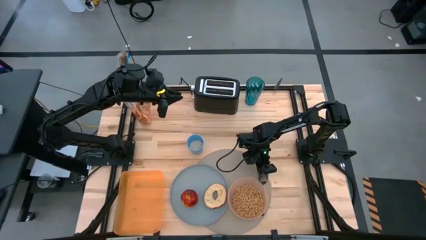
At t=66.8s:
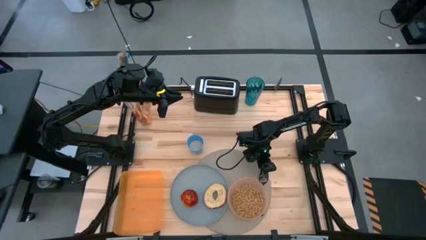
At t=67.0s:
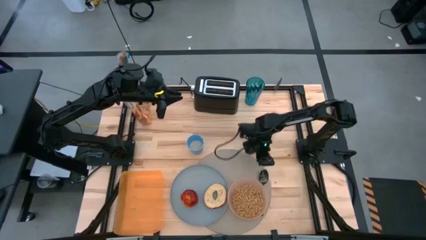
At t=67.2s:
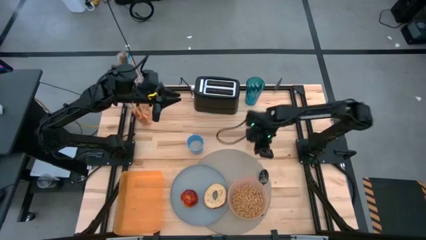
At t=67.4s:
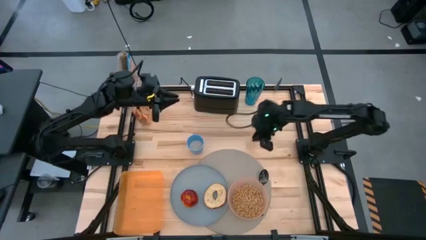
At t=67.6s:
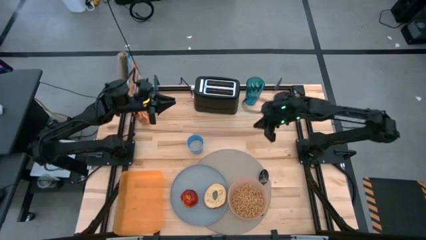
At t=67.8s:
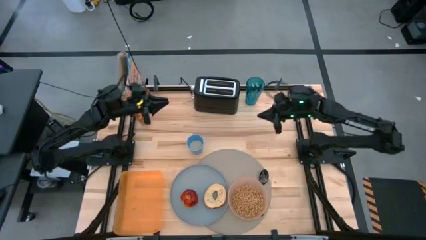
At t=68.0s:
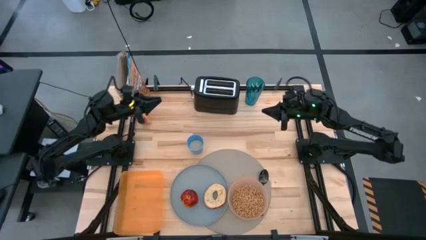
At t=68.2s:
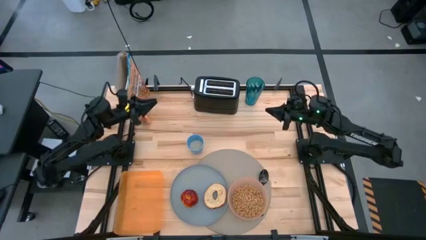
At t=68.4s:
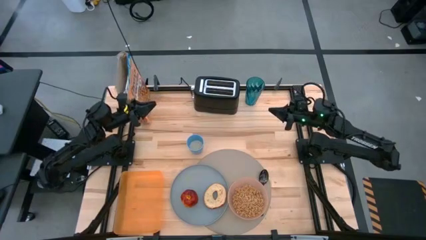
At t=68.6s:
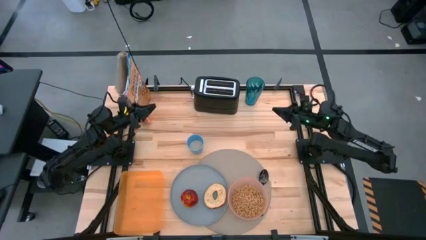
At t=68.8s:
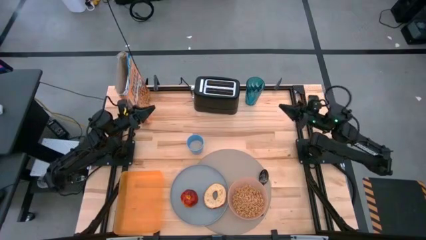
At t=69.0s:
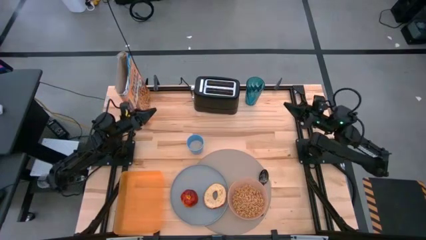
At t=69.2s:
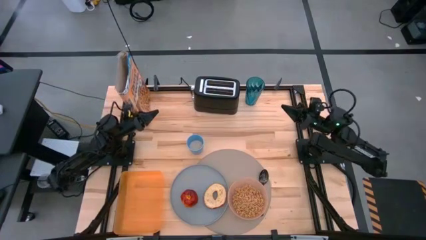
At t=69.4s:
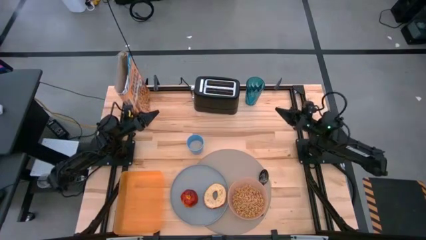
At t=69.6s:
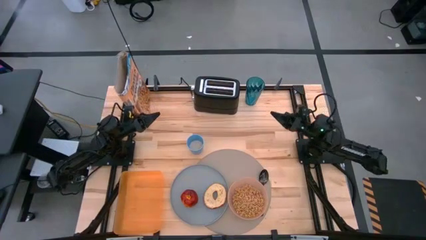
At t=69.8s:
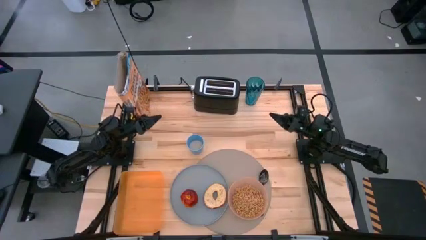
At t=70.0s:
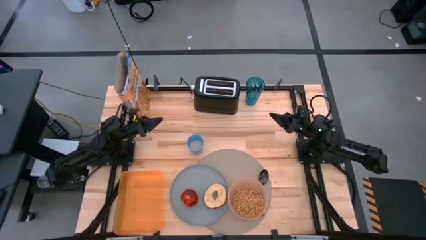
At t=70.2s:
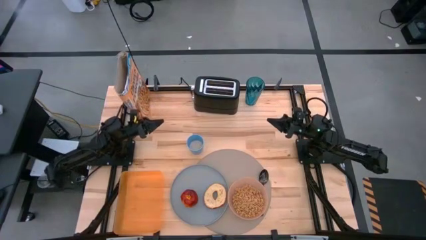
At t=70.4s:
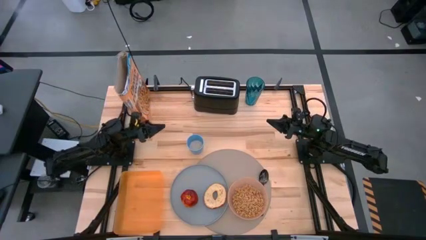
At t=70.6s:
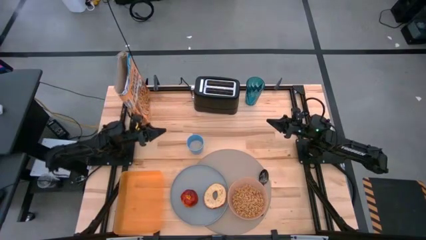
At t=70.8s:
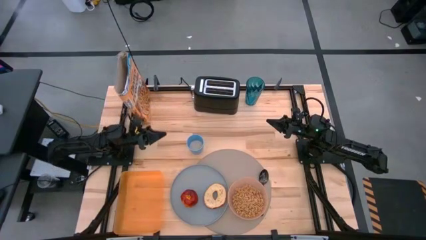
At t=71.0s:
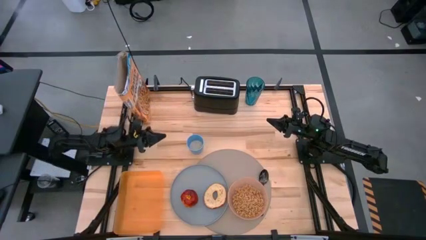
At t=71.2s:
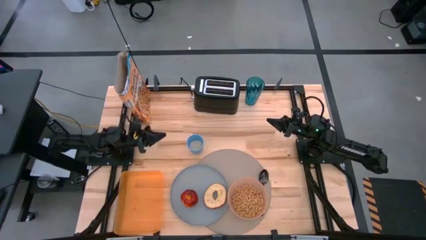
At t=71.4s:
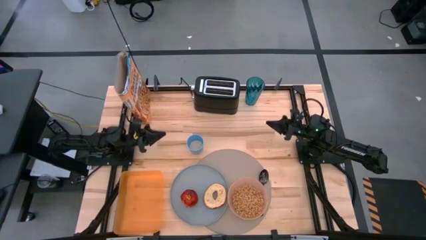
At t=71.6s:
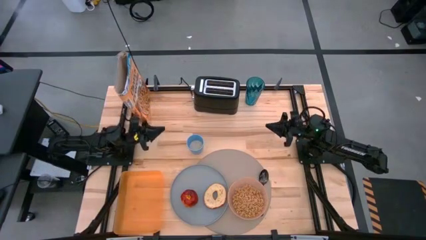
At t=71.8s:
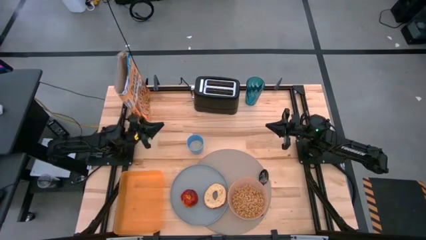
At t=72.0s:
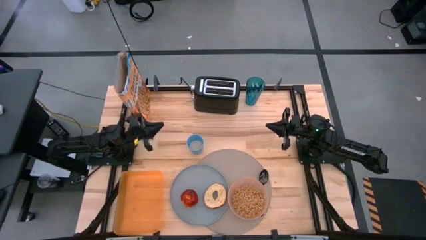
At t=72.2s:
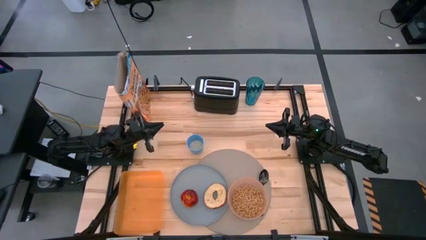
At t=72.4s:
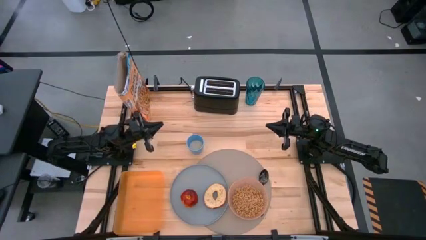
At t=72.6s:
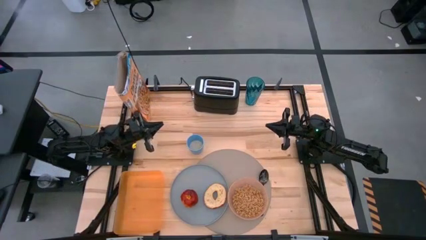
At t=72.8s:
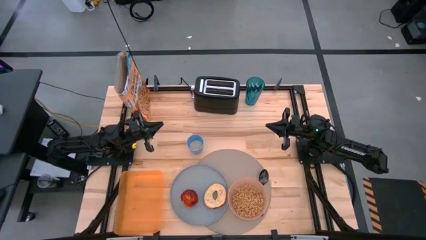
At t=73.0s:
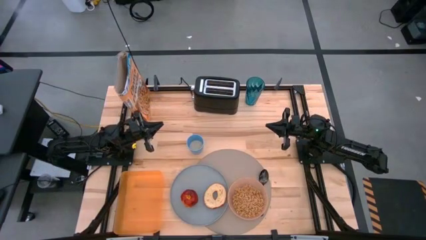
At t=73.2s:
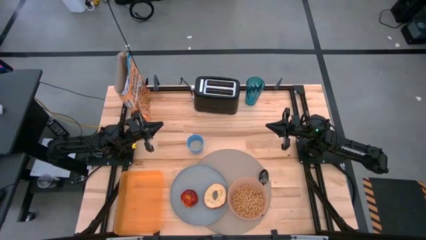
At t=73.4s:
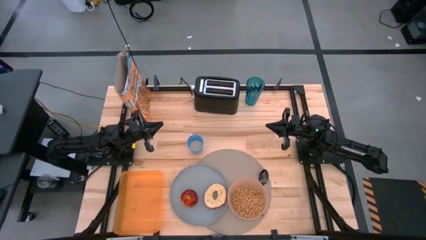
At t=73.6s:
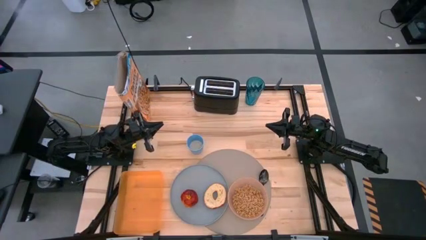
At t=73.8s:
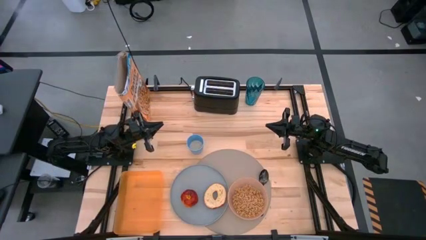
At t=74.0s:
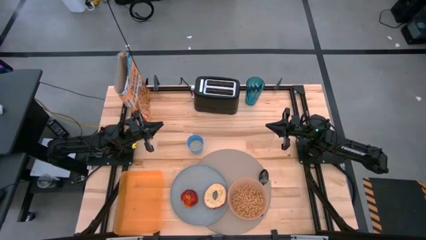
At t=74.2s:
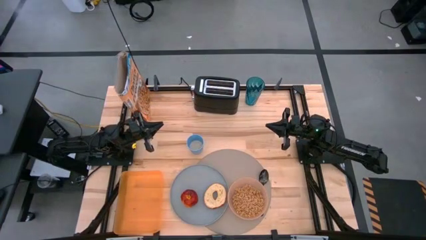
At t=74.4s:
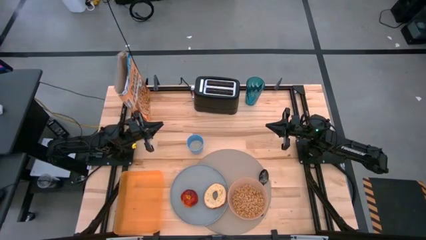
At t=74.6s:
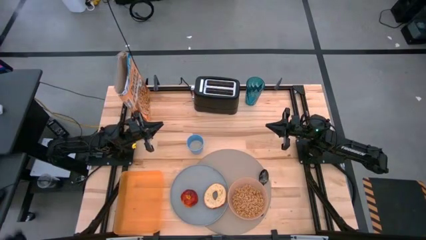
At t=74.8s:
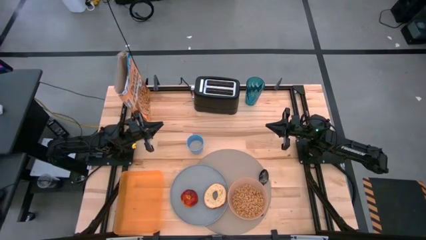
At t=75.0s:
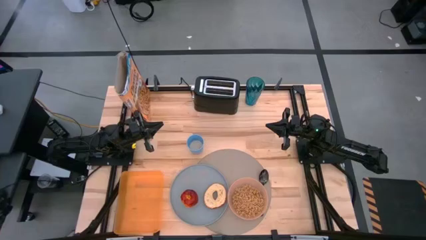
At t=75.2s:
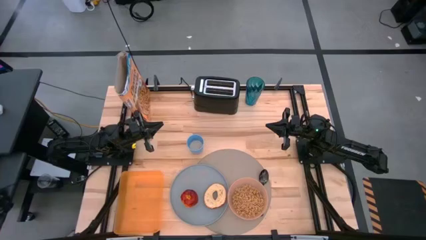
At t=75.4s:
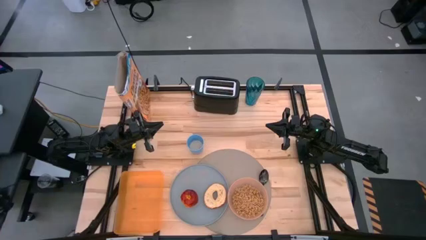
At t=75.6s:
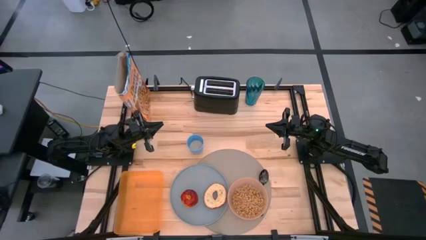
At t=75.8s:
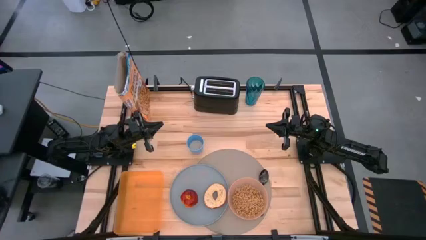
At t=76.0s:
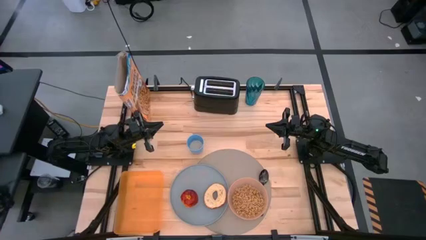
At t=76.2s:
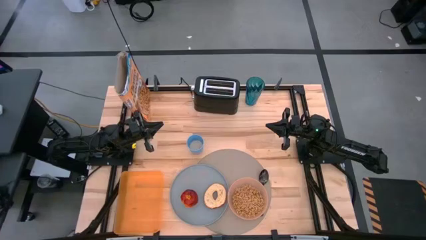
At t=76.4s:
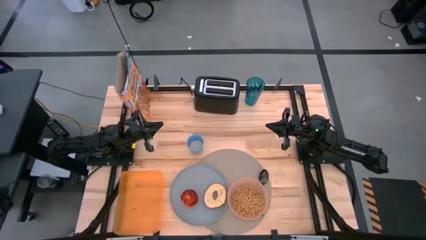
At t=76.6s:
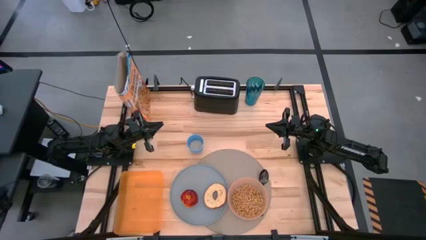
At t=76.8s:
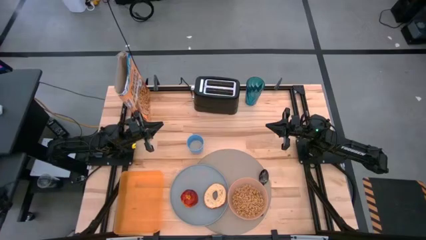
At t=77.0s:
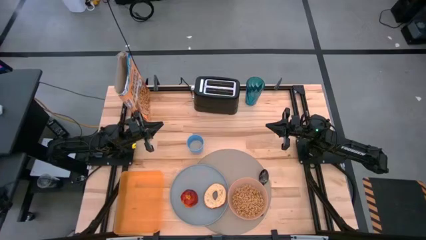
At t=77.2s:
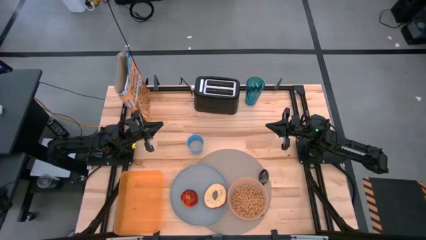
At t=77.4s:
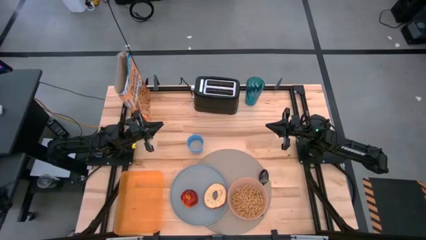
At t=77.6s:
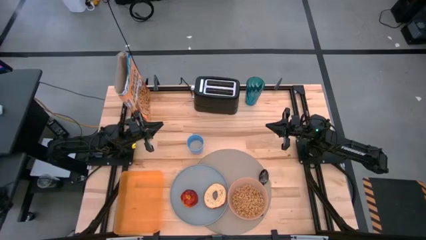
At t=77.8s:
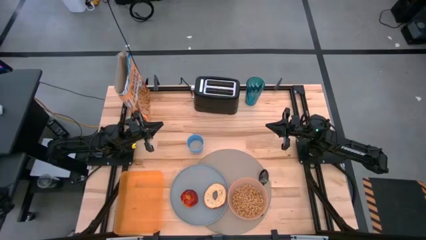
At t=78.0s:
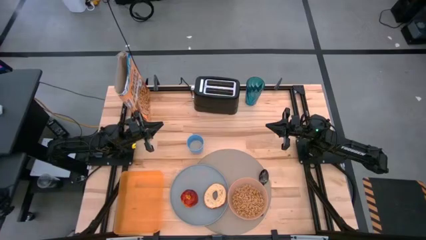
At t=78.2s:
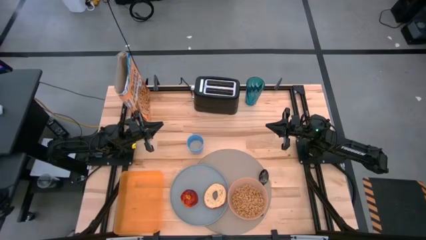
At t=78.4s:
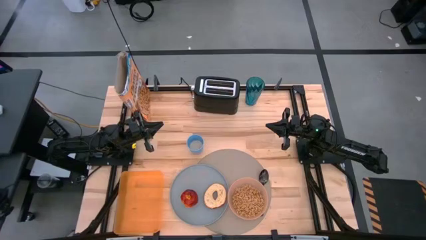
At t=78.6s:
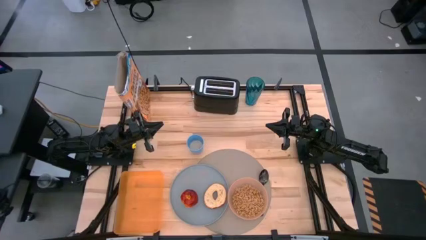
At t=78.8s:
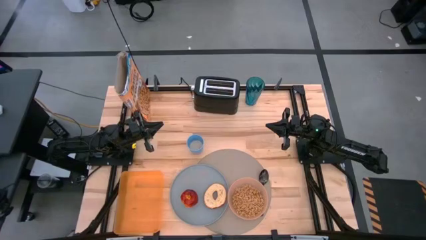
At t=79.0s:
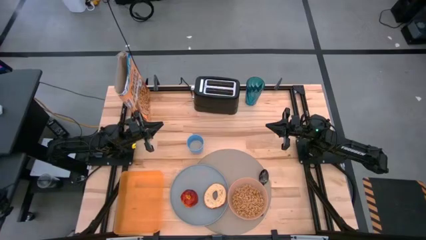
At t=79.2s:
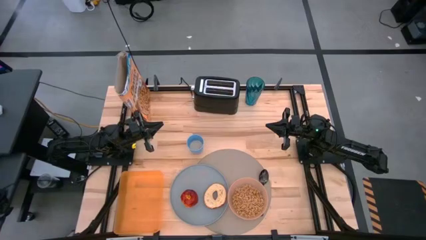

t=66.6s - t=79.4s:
Task: Arrange a breakfast setting
Return to Home Position
